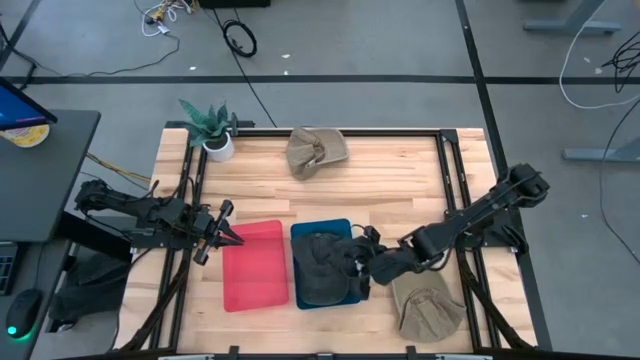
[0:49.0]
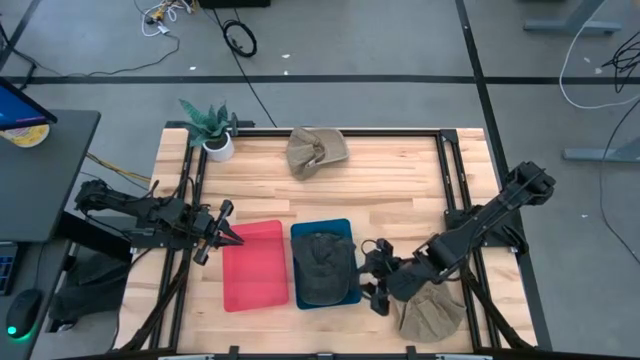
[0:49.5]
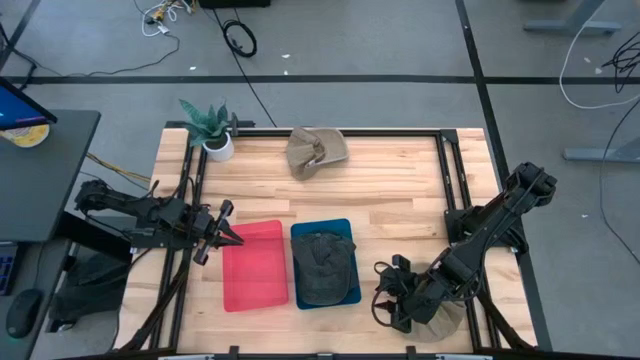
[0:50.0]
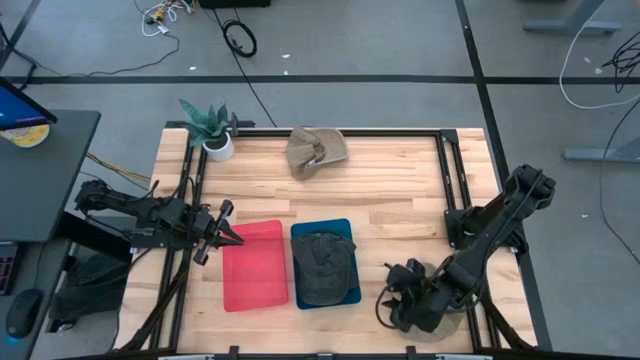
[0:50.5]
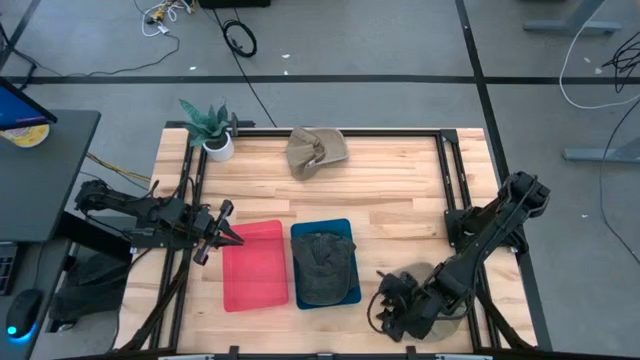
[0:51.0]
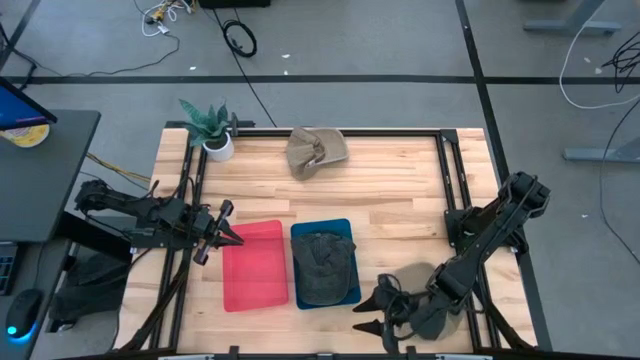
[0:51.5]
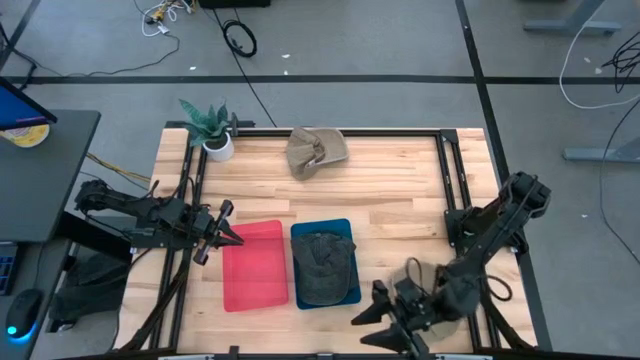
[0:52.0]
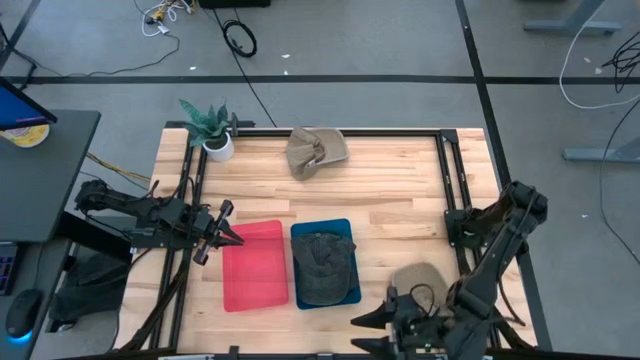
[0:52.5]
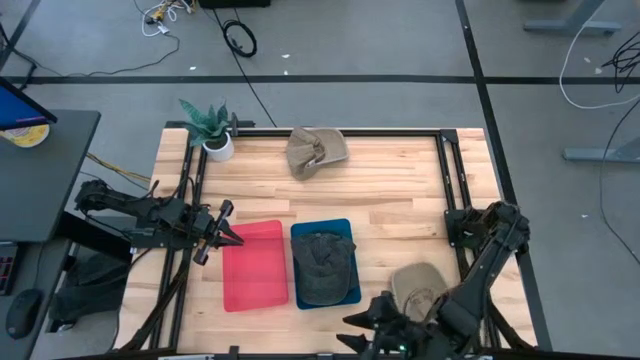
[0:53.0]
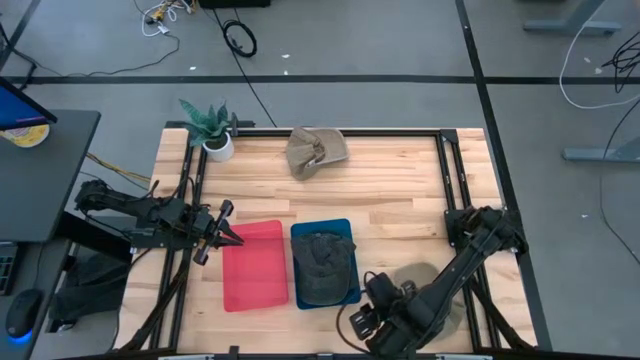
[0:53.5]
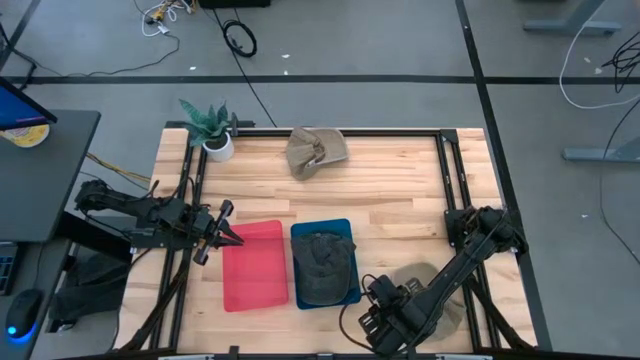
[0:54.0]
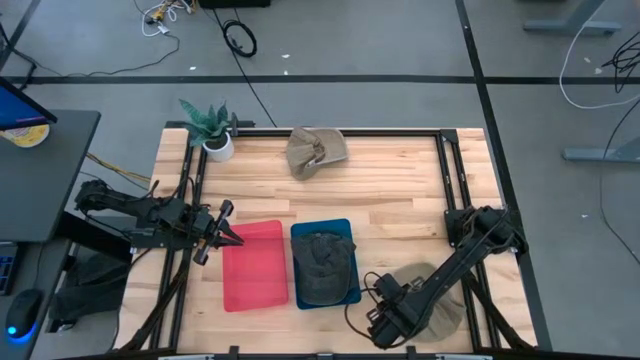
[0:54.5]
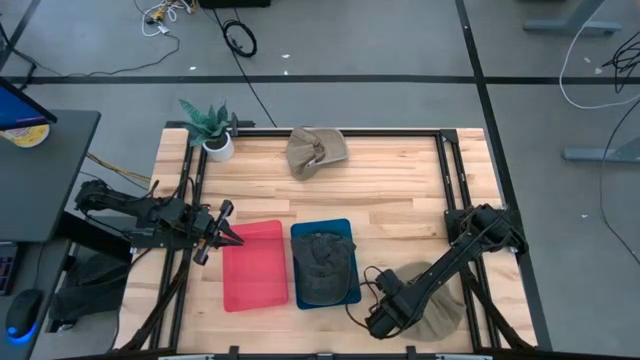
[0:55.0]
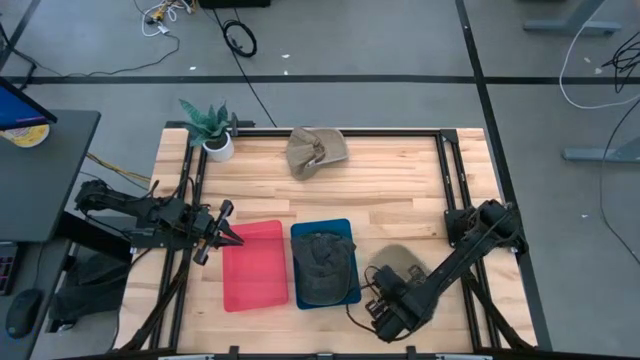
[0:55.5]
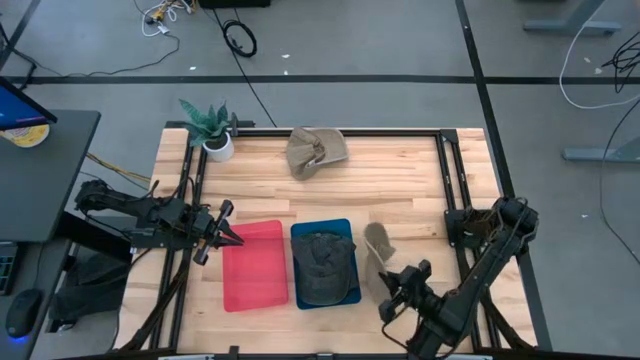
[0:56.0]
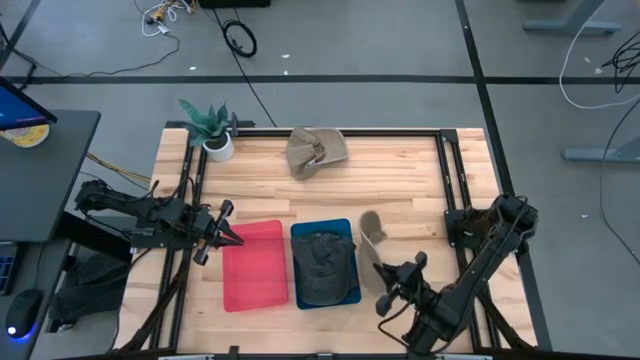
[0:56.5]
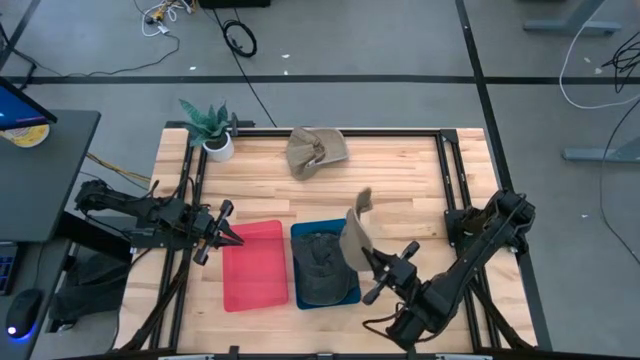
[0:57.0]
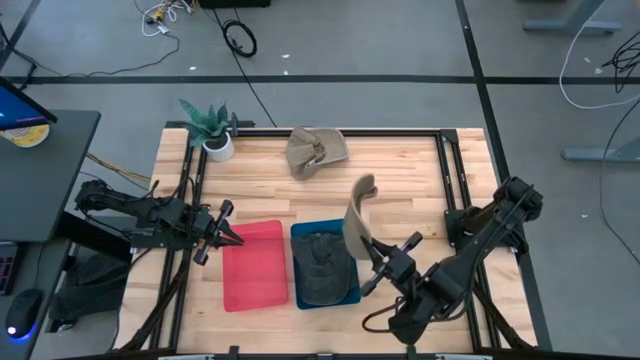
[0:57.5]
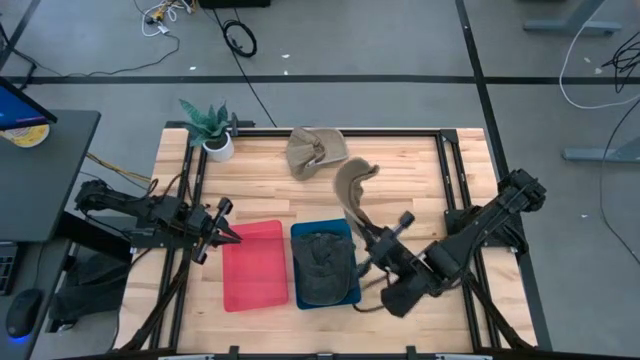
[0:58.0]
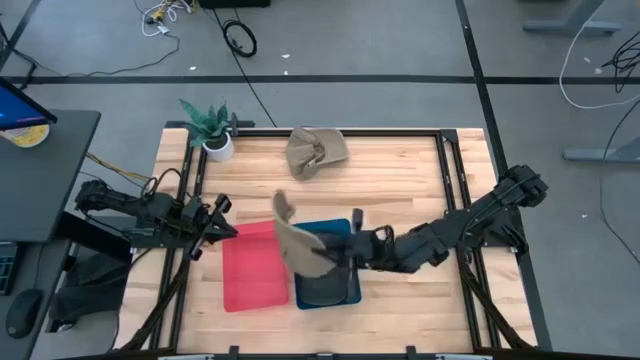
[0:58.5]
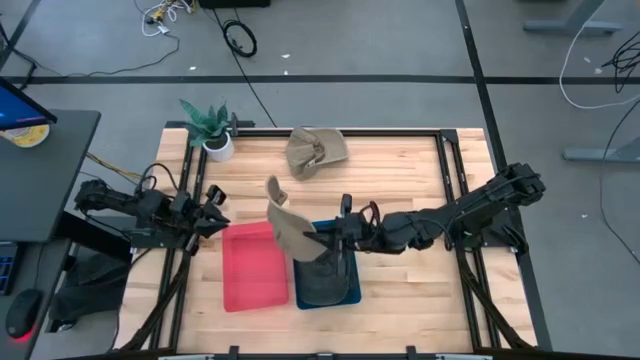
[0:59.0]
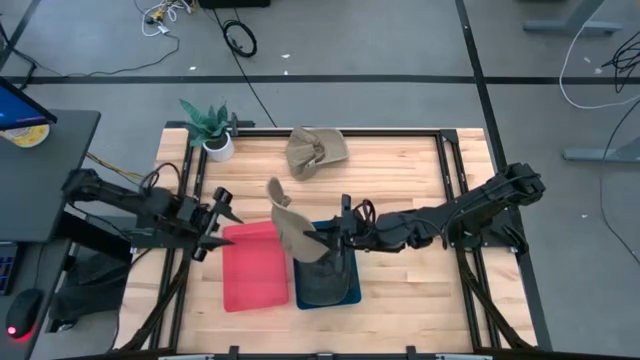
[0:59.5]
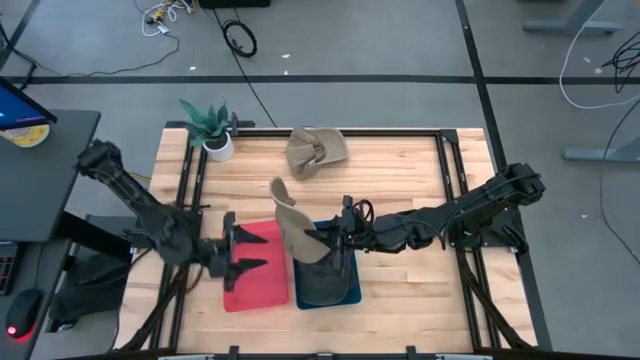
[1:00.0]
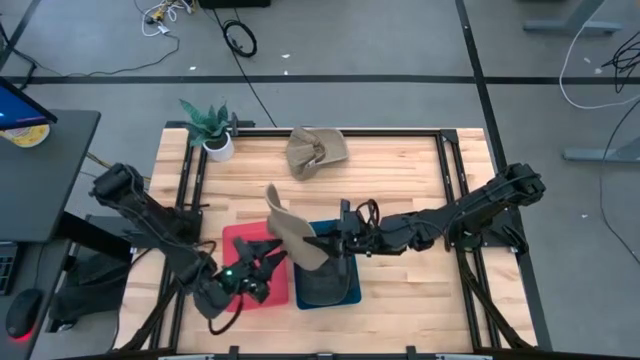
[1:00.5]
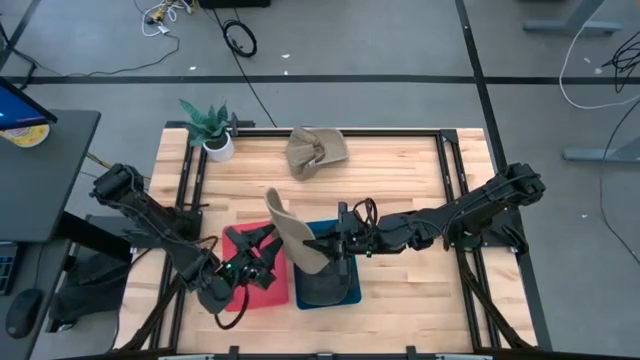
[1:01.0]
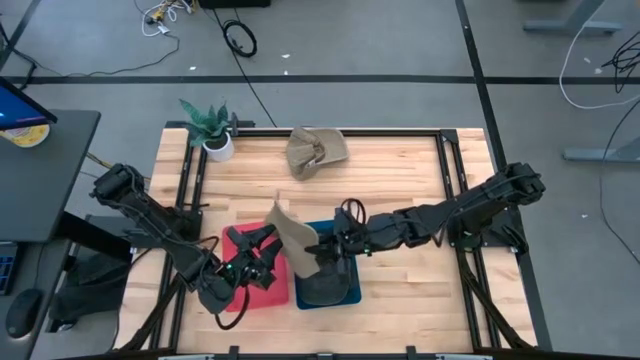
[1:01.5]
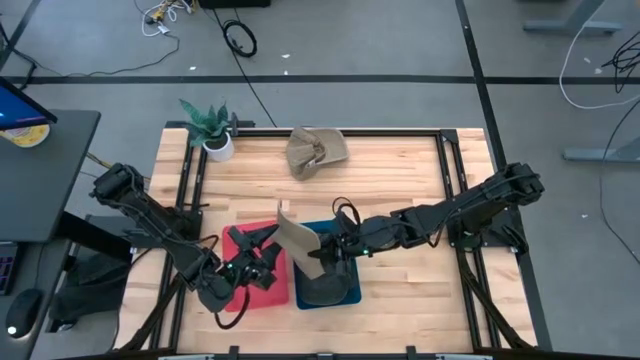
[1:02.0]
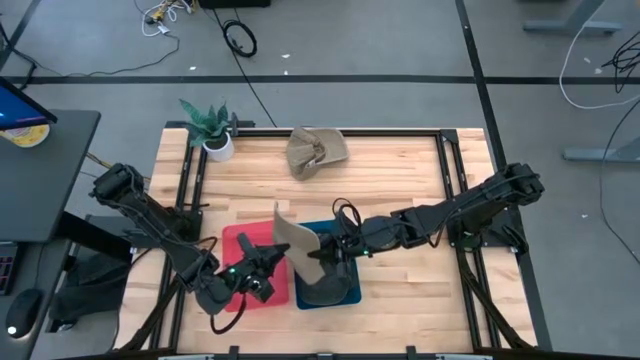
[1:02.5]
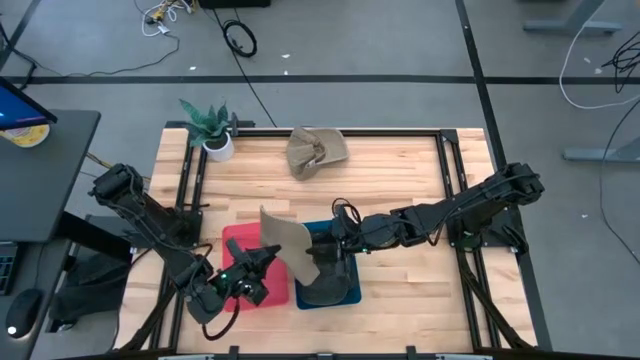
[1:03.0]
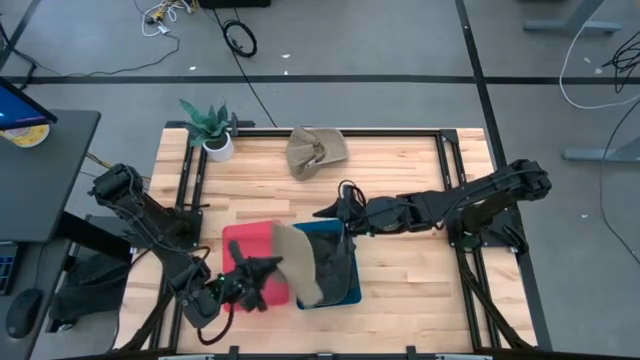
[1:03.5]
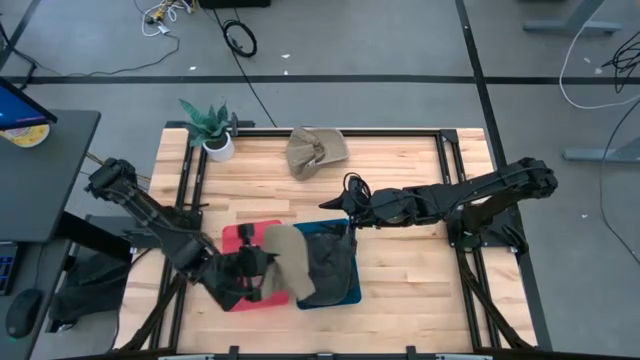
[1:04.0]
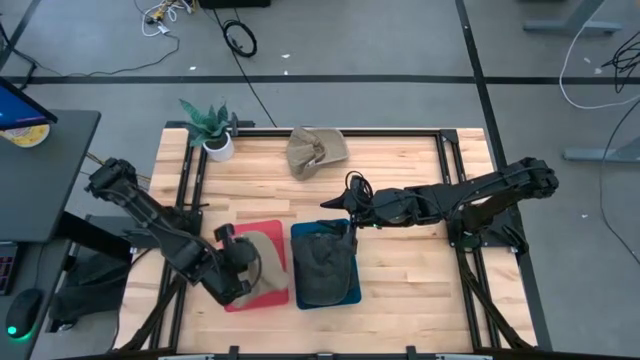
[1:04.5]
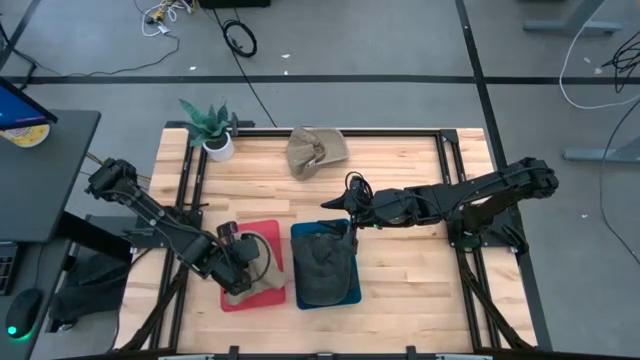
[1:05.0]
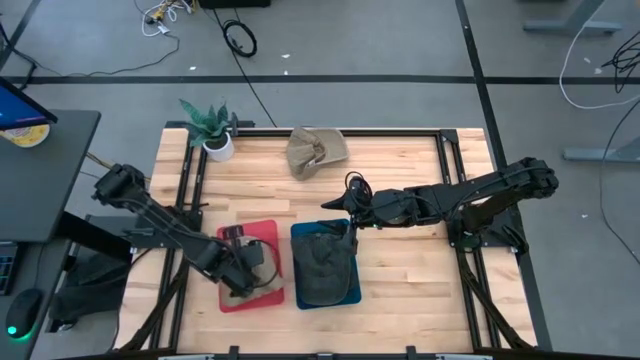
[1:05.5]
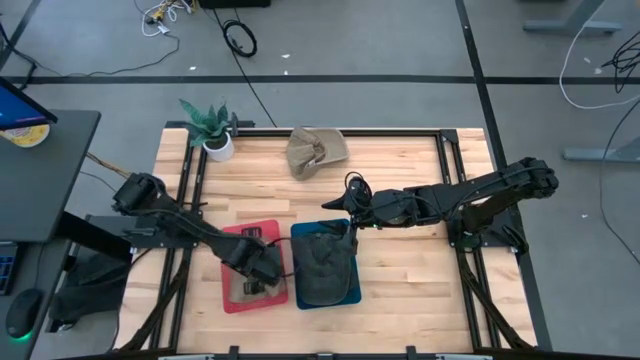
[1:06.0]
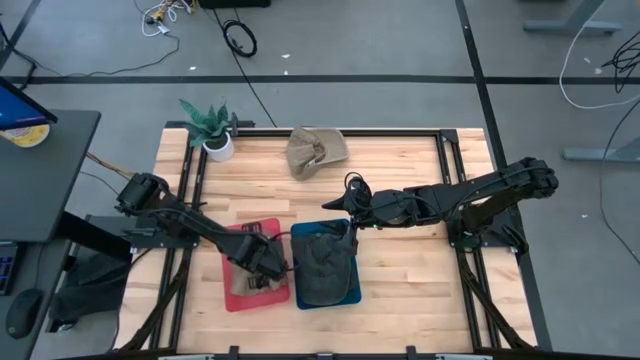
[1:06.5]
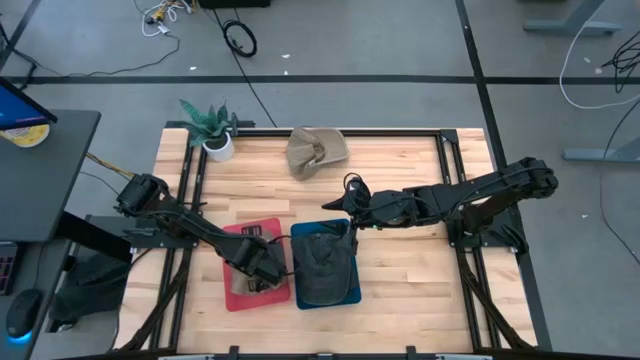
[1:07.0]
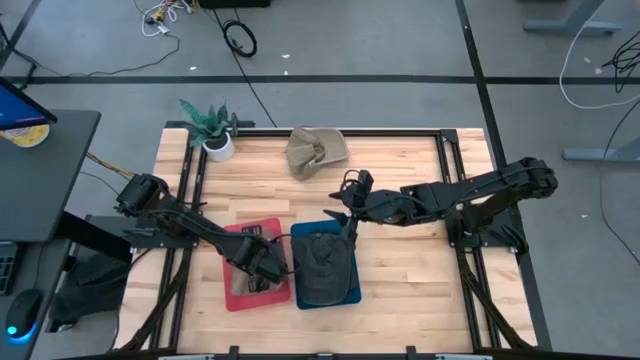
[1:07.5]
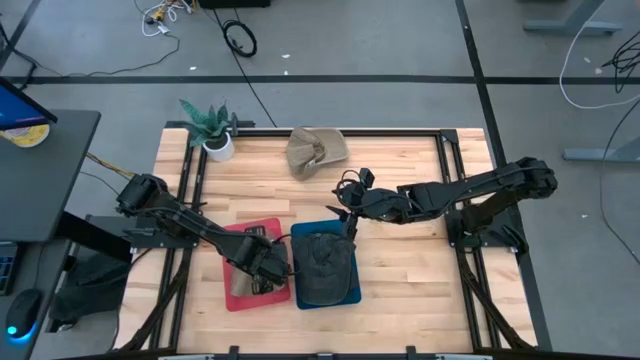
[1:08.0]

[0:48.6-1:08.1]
Task: Pick & Place hat
Put the bottom brown cap into the red bin

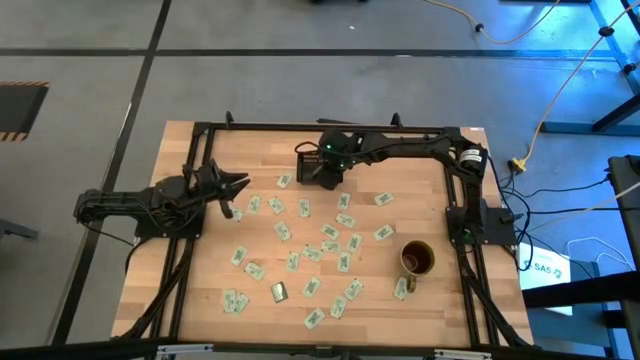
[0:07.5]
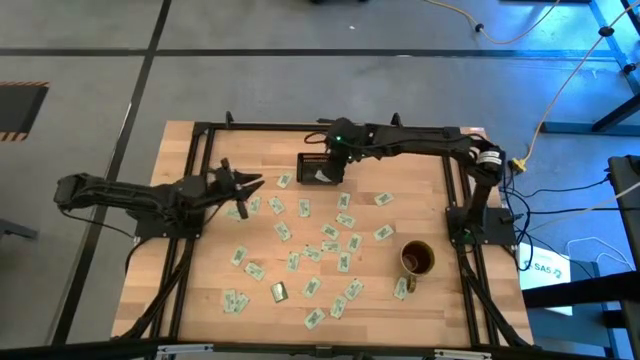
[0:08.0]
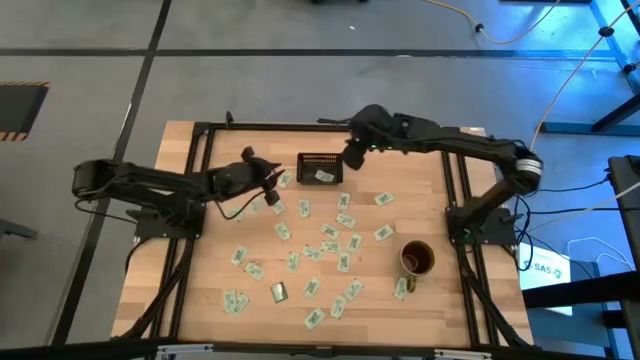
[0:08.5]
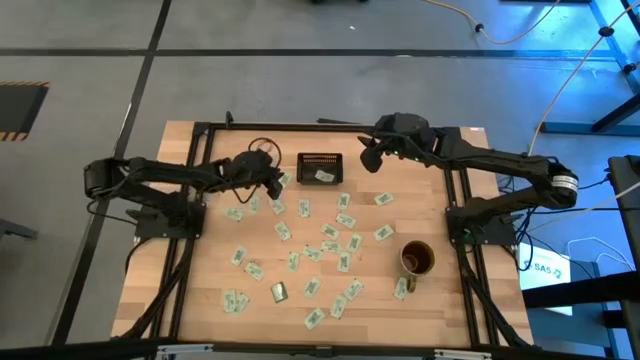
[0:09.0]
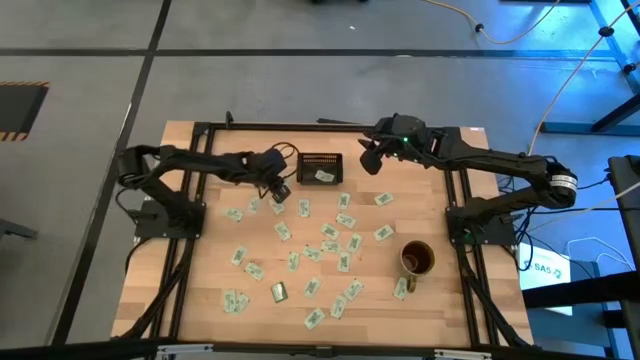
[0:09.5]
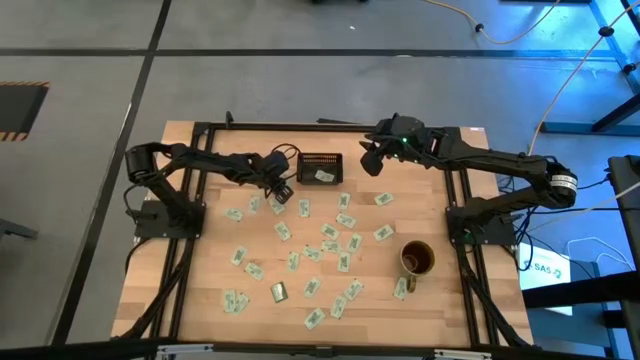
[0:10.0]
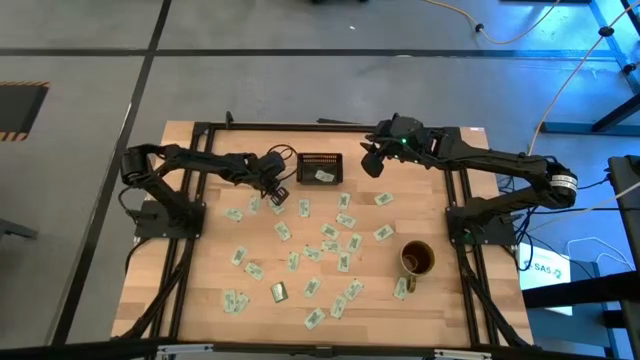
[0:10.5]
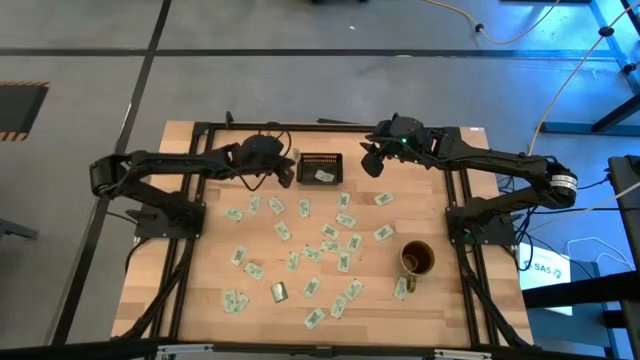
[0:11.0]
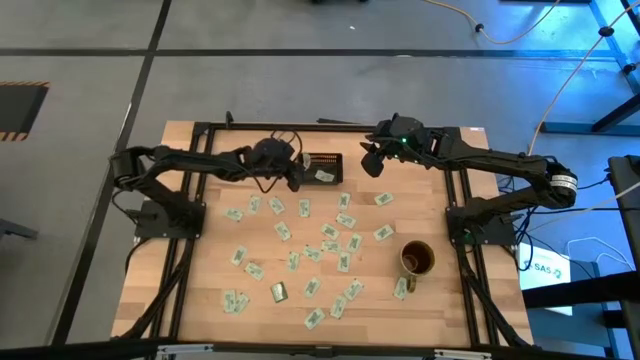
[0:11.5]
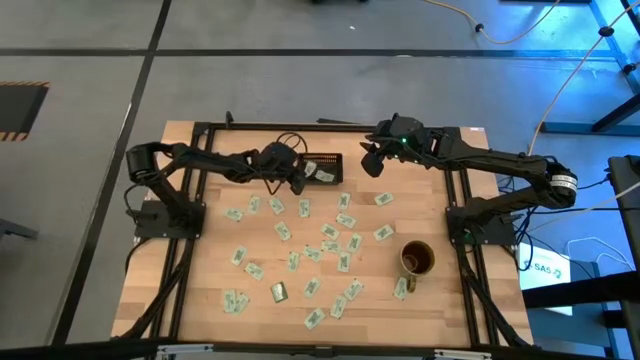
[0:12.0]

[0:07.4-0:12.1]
Task: Pick and place Stevia / Truvia into bins
Put the white stevia packet into the black bin
